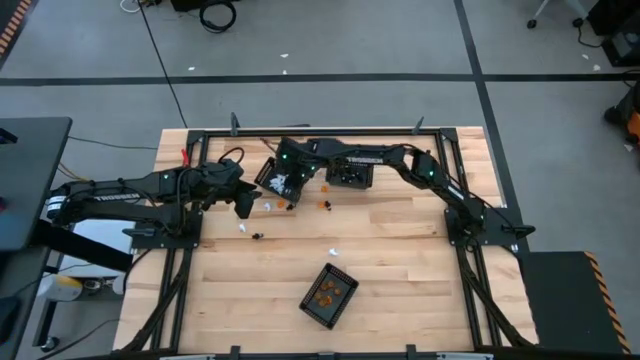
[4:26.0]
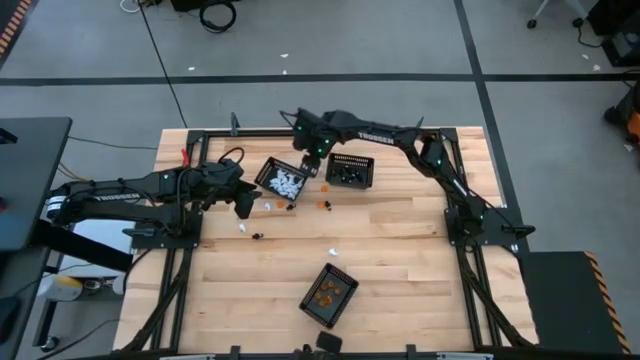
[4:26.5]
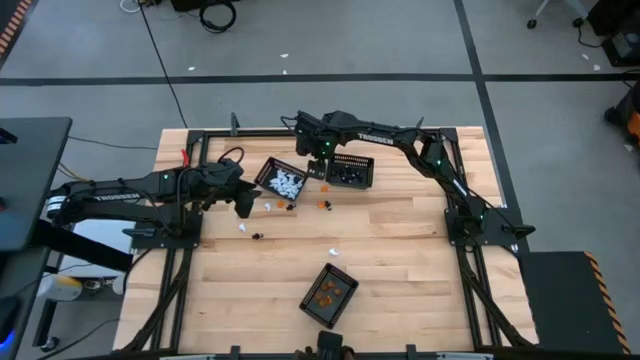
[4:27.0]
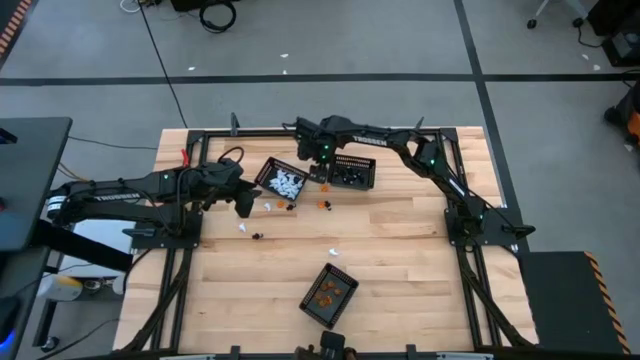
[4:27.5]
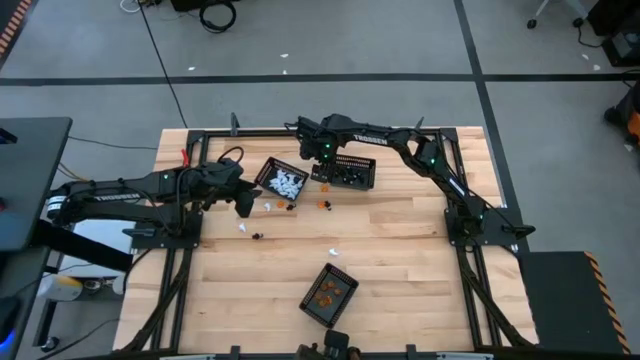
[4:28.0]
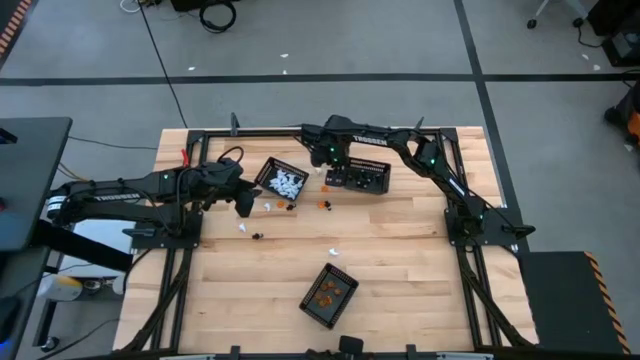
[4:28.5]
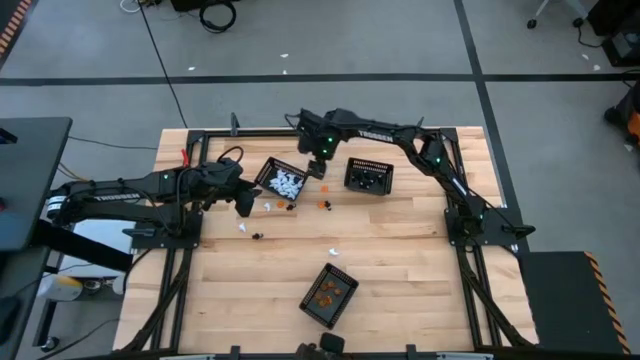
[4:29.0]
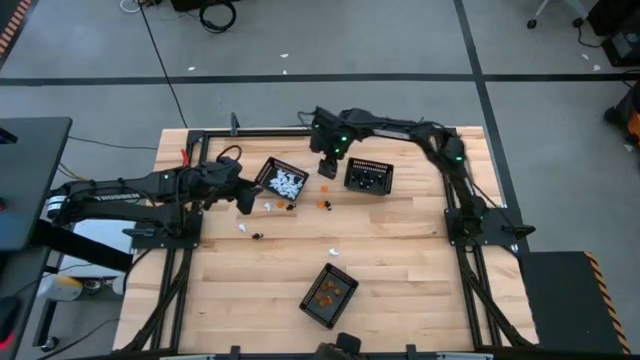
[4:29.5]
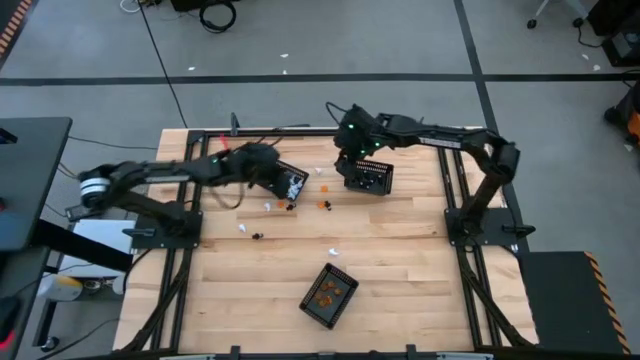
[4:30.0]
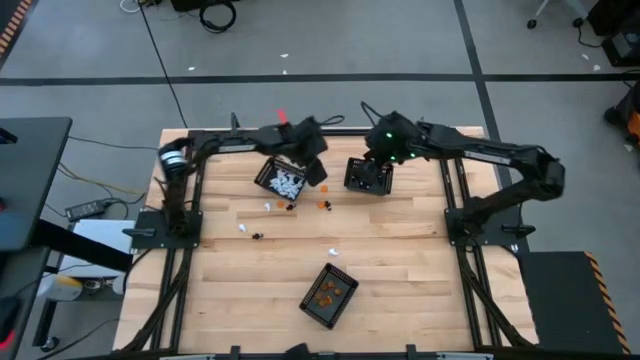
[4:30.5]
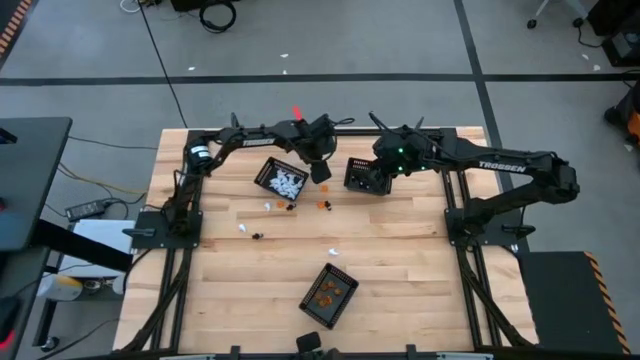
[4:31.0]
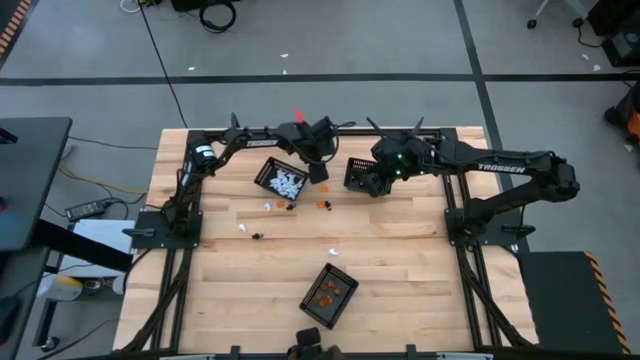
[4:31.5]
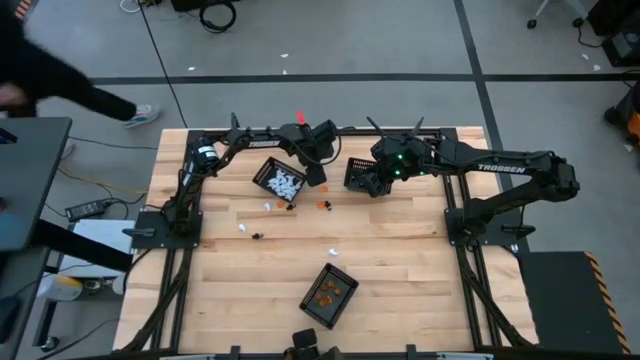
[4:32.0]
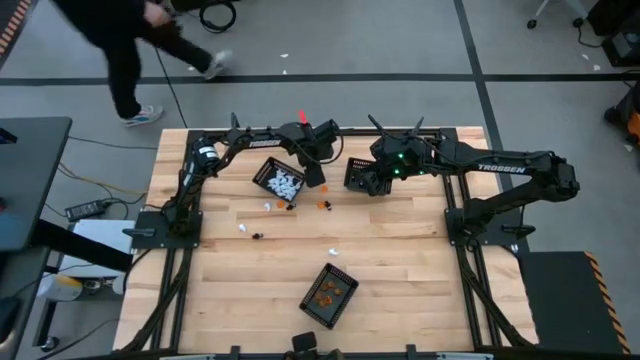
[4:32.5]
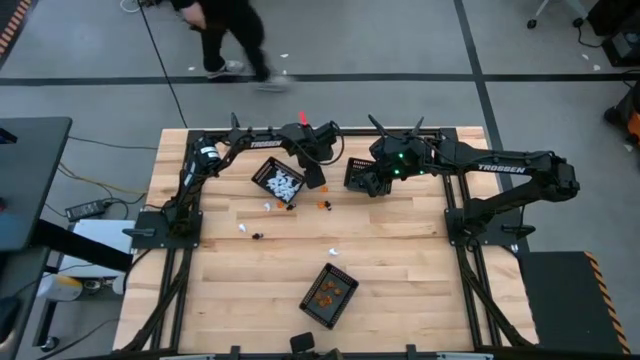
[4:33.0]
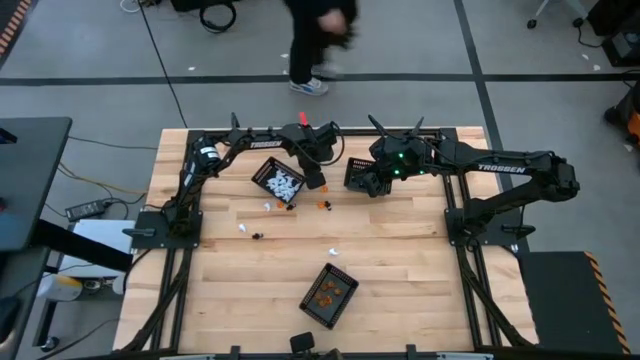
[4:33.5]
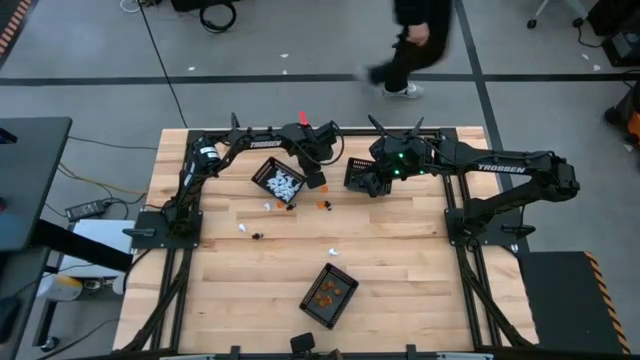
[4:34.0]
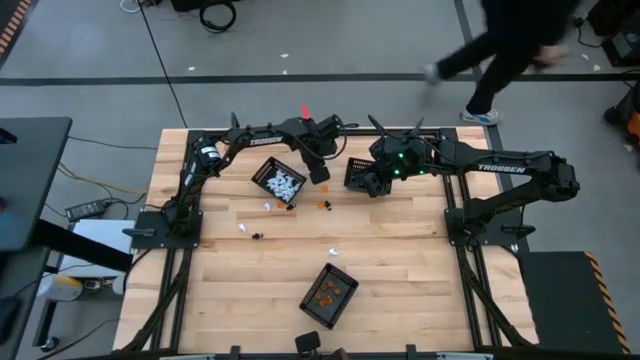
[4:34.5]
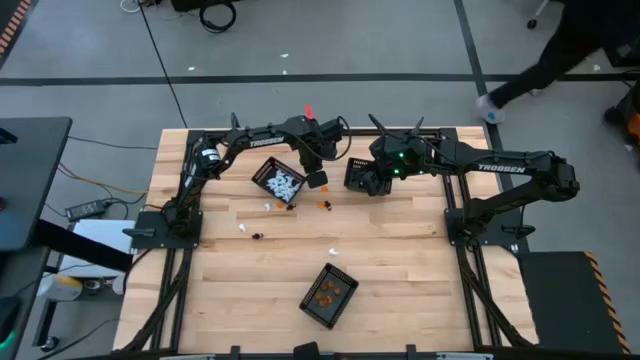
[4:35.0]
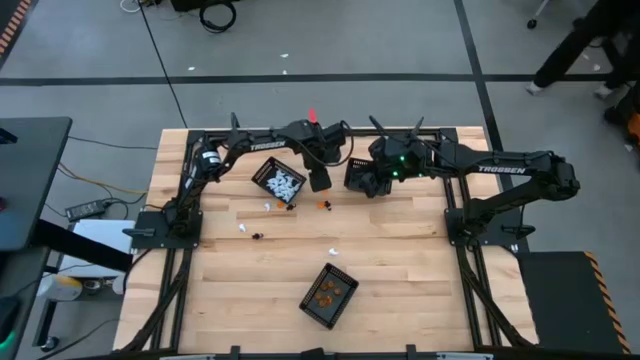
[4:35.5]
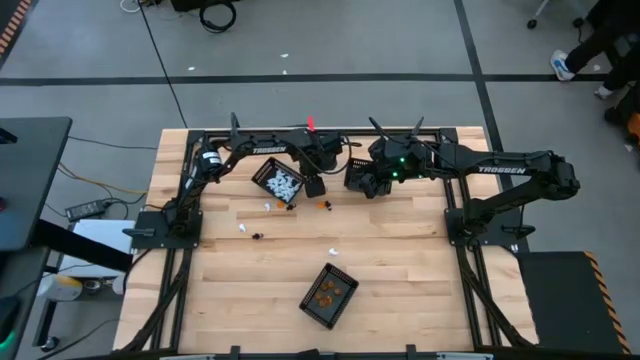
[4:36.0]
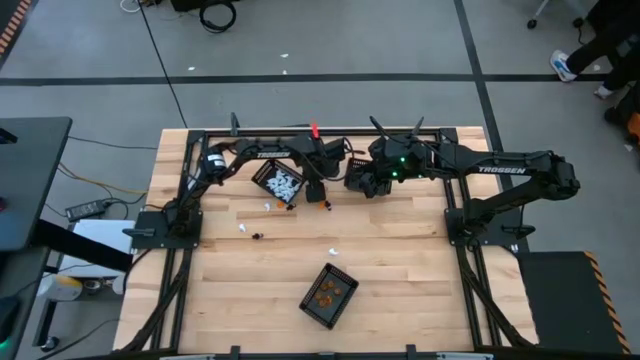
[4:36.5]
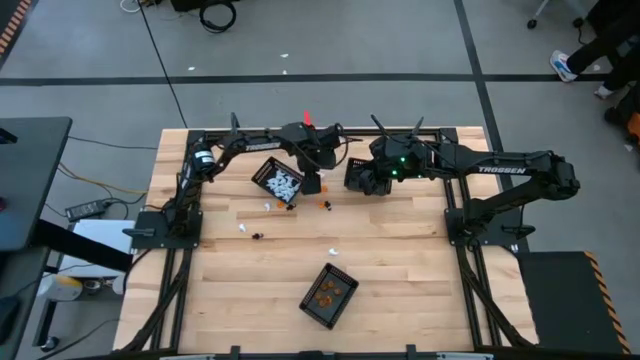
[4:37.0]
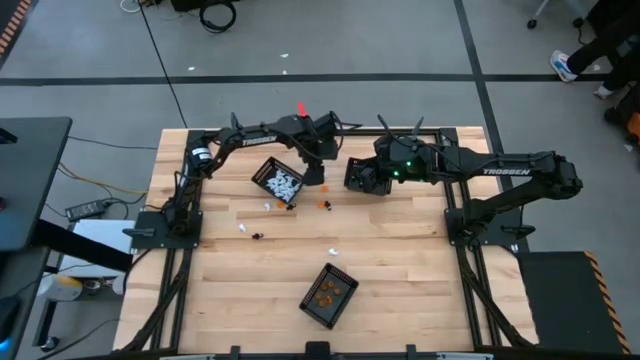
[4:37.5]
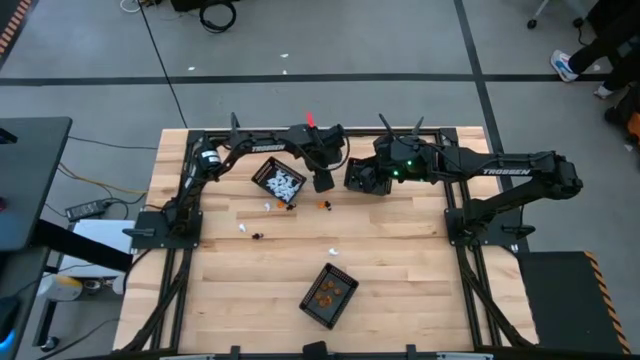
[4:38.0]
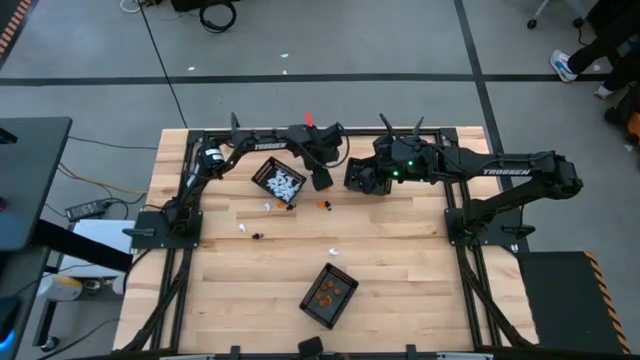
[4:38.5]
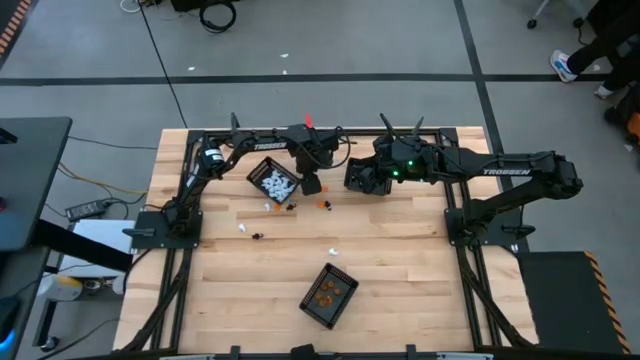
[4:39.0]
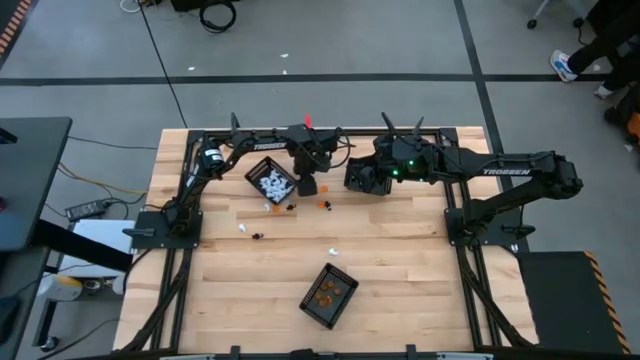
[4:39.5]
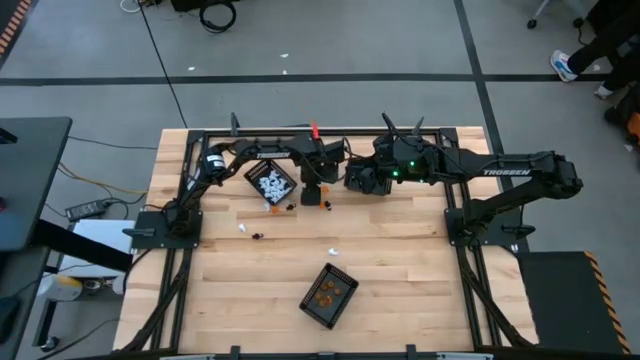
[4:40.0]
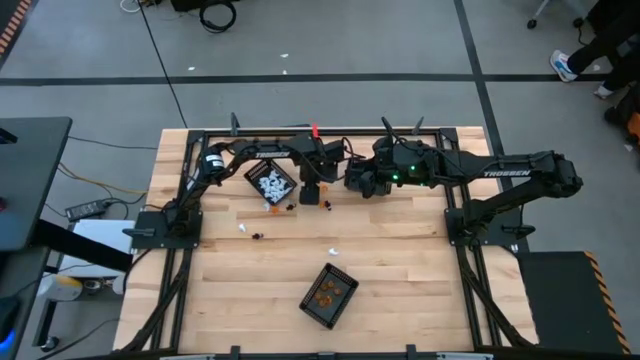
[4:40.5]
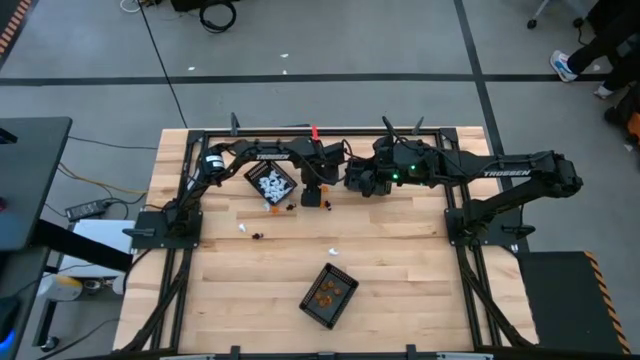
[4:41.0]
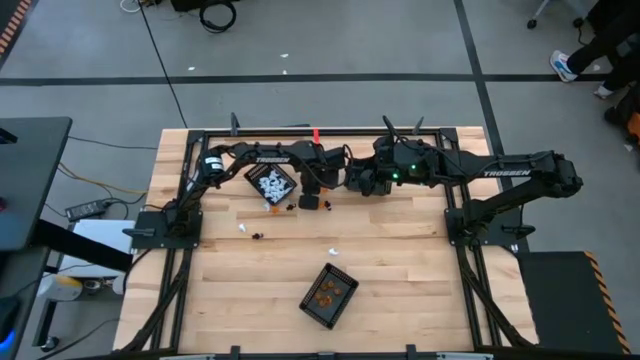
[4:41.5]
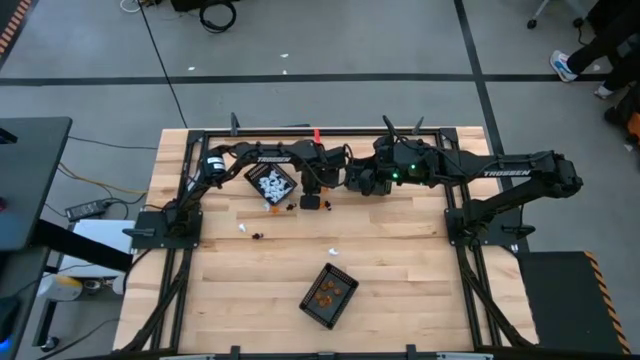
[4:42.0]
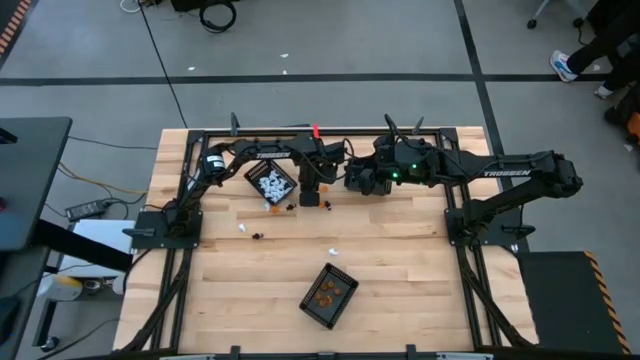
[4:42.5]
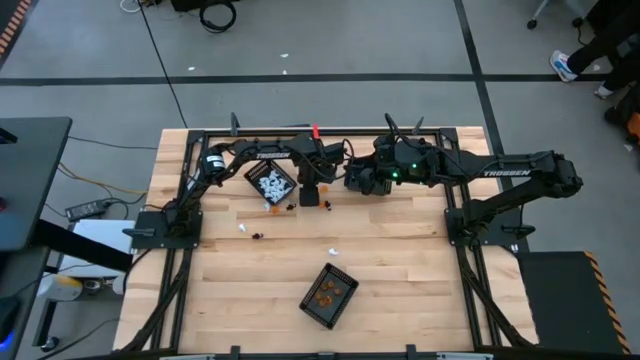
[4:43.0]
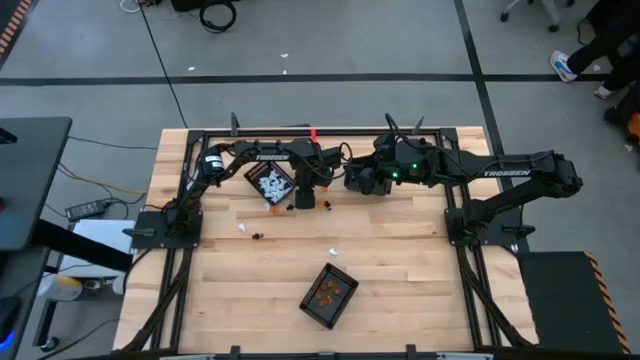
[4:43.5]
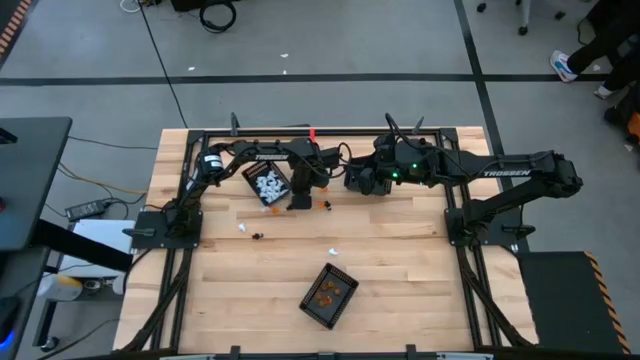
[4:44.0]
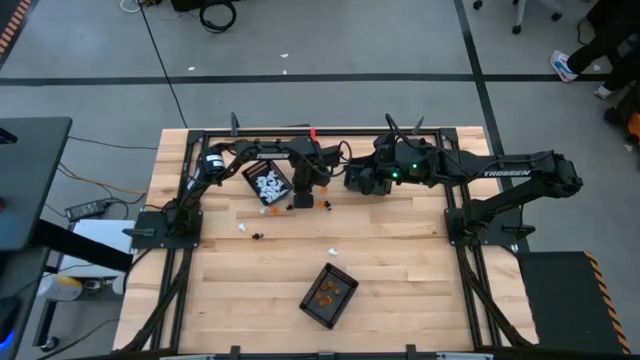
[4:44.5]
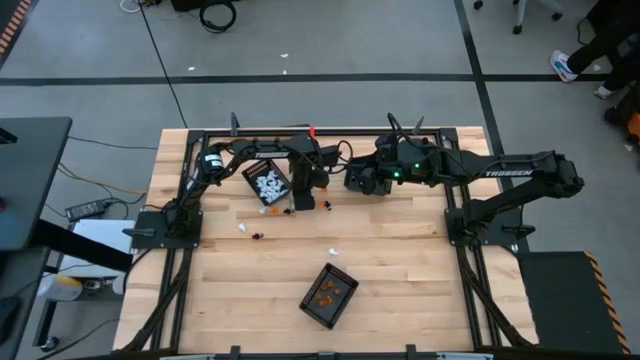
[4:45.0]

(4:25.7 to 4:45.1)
Task: Sort Halloween decoration
Put the white ghost toy into the top left black basket

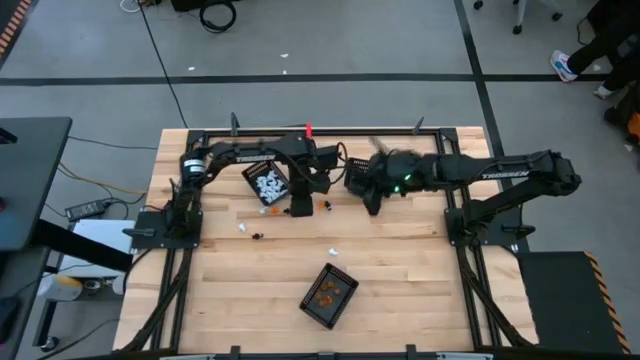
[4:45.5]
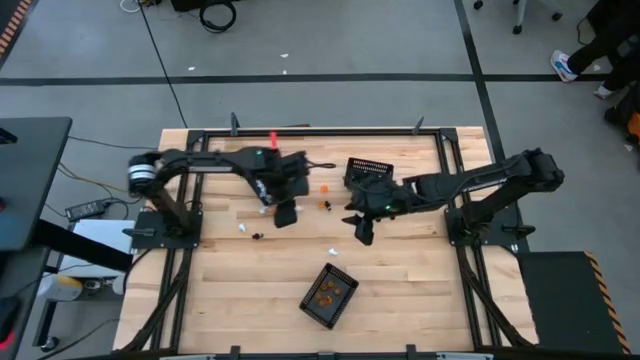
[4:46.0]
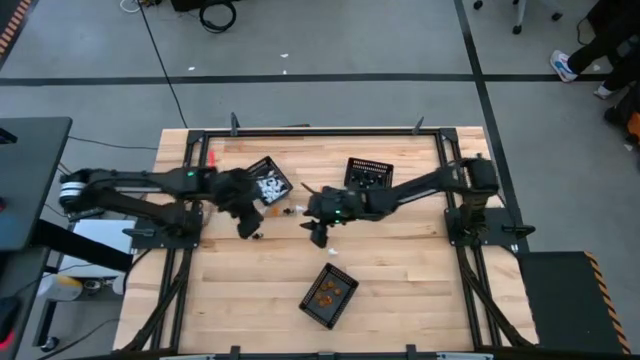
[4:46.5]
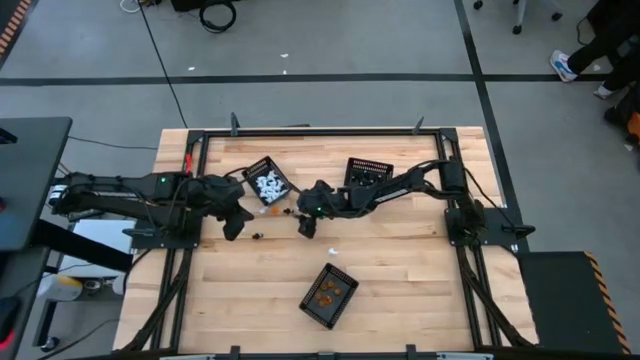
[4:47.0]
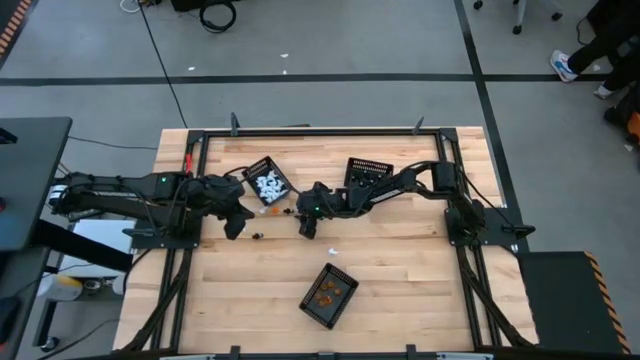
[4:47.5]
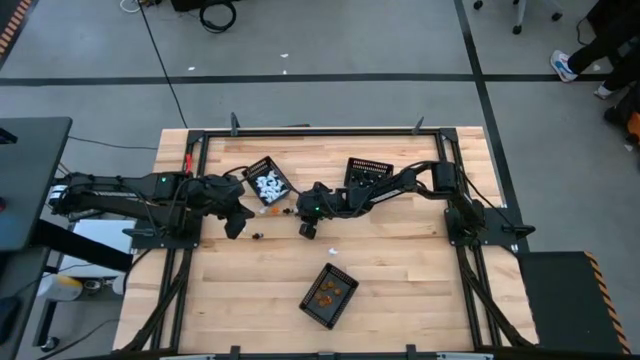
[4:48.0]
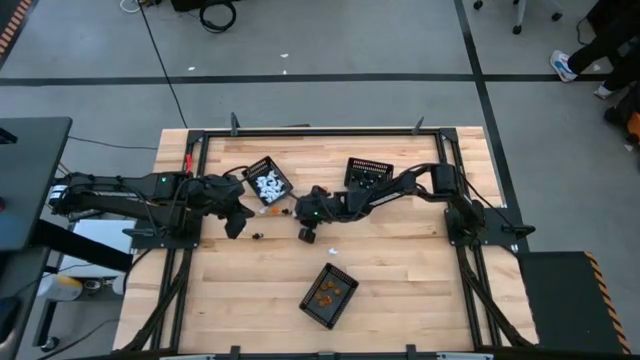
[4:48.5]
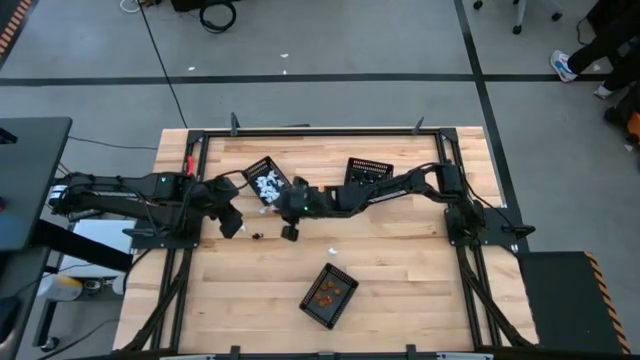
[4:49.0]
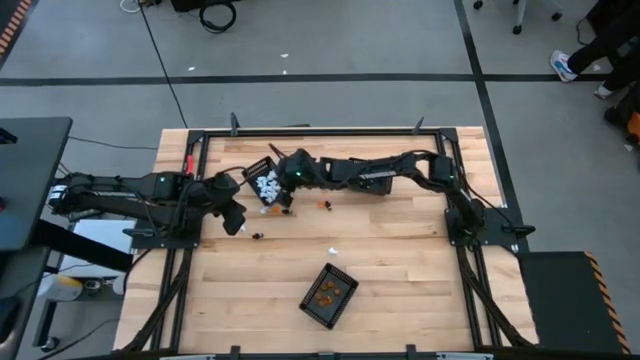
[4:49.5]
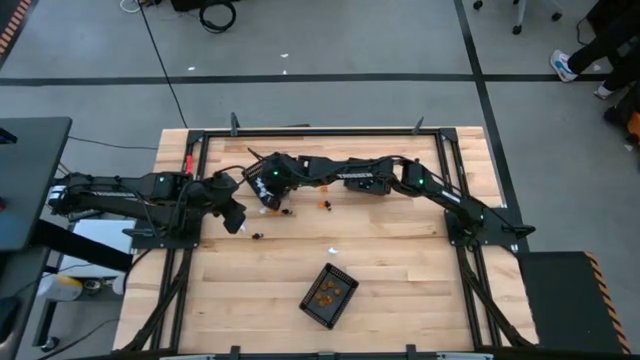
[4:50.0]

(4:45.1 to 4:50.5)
Put the white ghost toy into the top left black basket
